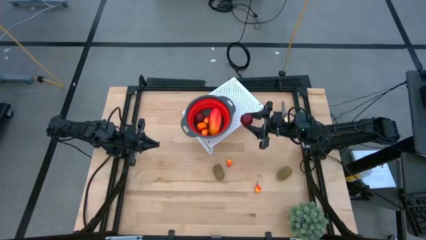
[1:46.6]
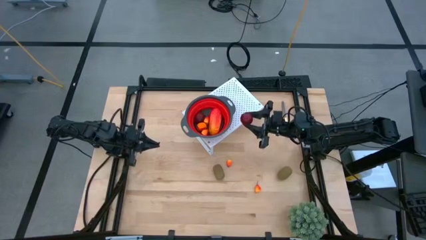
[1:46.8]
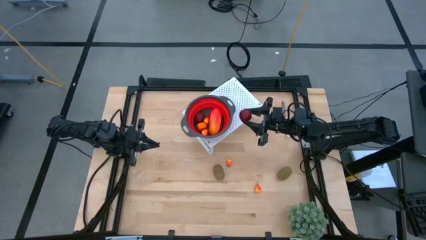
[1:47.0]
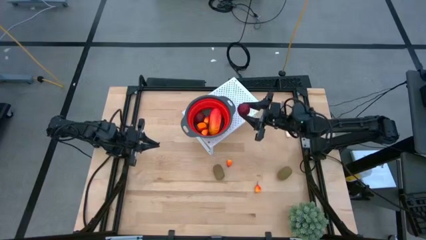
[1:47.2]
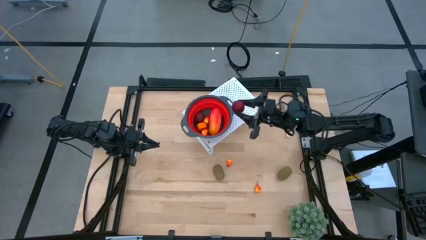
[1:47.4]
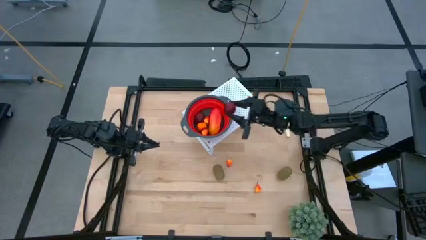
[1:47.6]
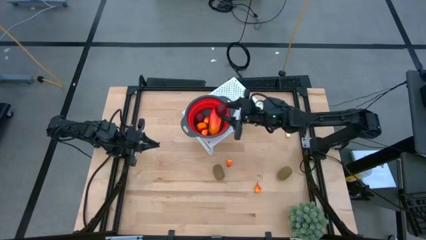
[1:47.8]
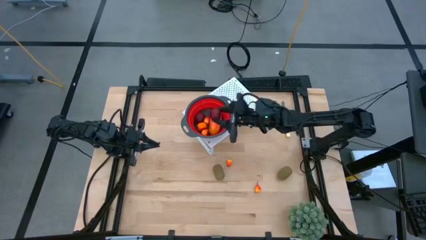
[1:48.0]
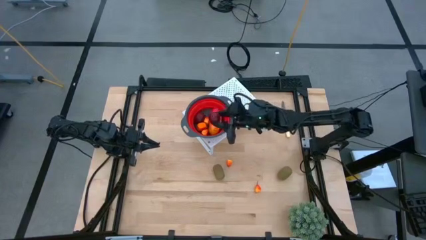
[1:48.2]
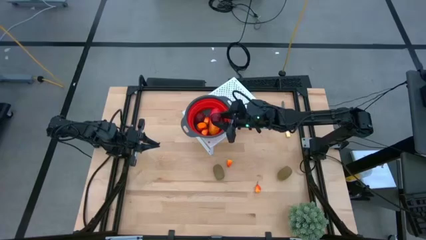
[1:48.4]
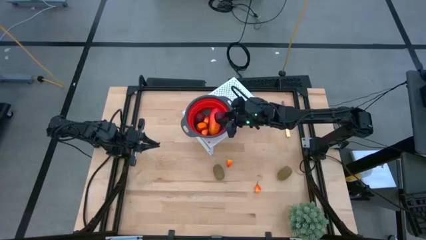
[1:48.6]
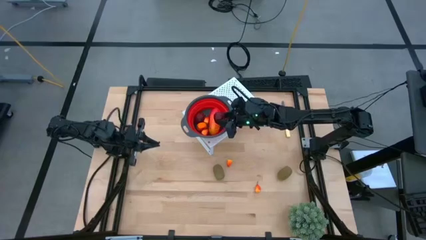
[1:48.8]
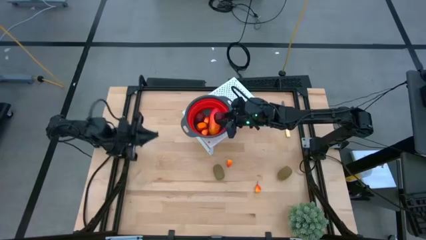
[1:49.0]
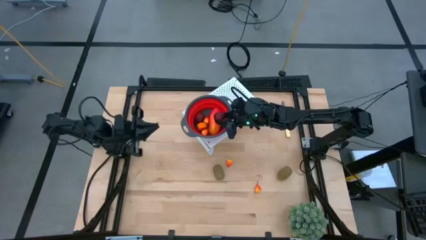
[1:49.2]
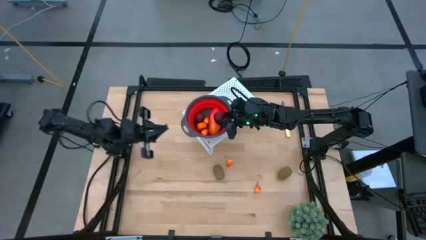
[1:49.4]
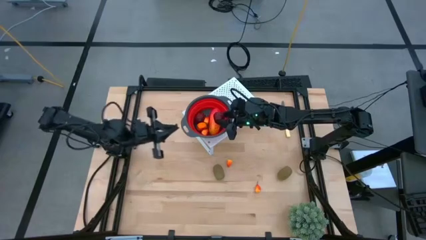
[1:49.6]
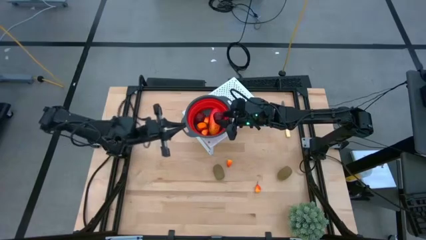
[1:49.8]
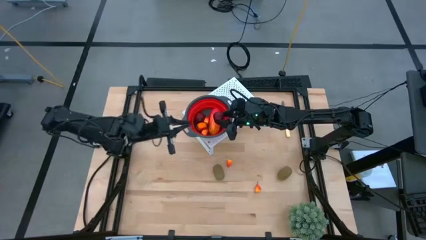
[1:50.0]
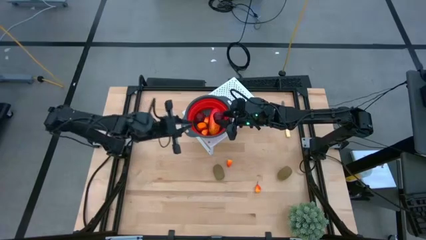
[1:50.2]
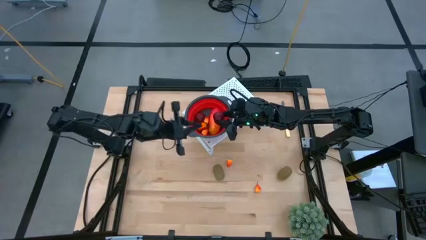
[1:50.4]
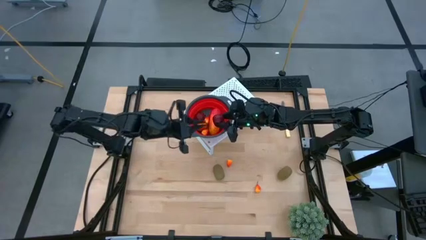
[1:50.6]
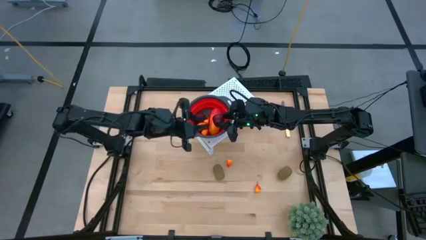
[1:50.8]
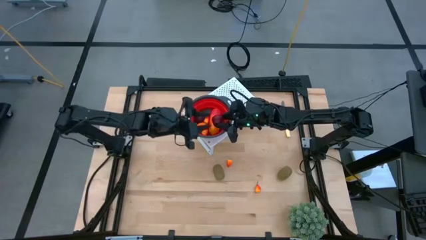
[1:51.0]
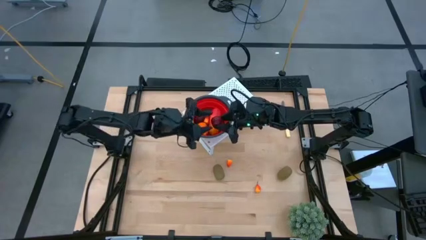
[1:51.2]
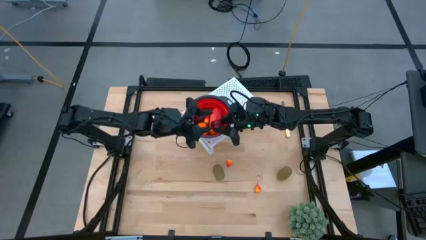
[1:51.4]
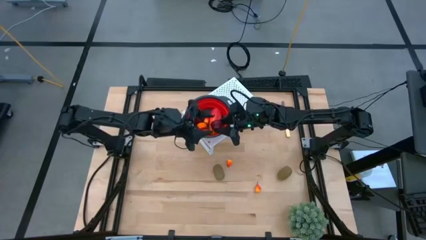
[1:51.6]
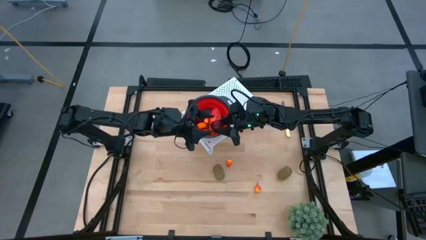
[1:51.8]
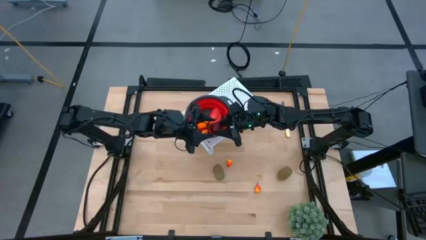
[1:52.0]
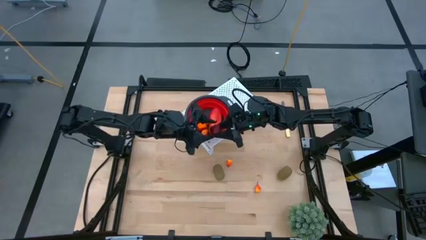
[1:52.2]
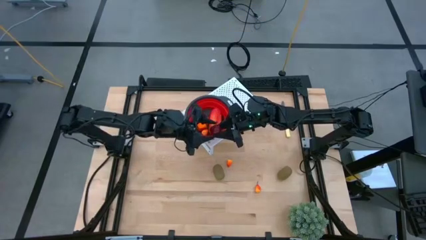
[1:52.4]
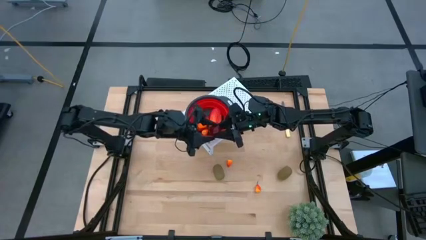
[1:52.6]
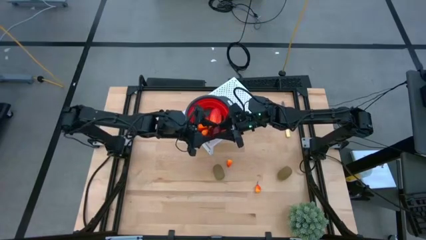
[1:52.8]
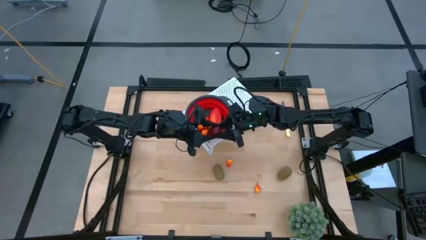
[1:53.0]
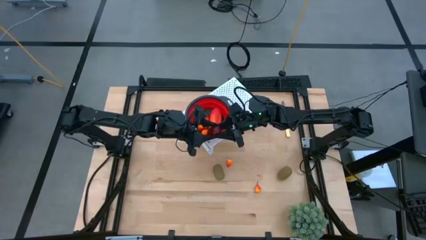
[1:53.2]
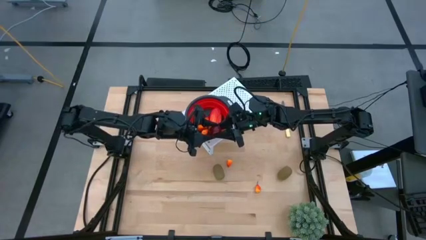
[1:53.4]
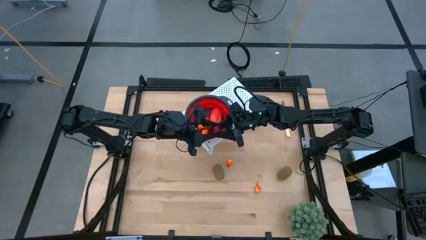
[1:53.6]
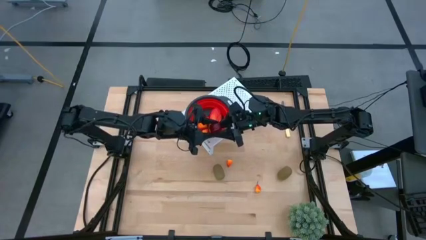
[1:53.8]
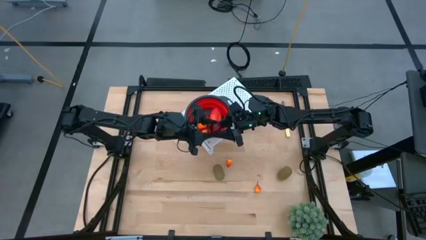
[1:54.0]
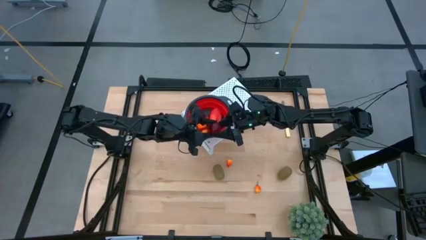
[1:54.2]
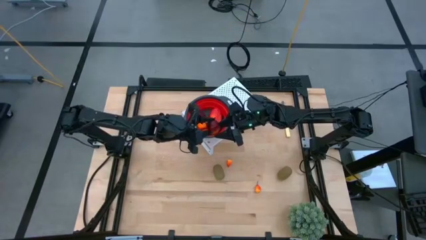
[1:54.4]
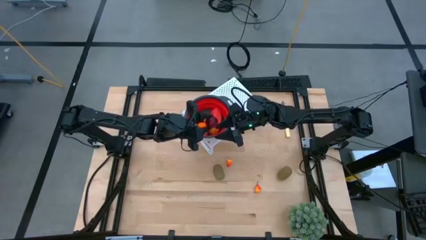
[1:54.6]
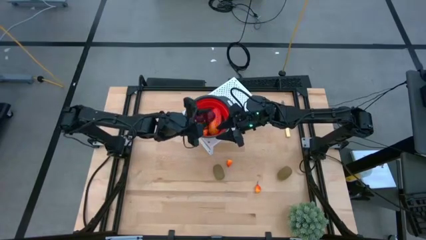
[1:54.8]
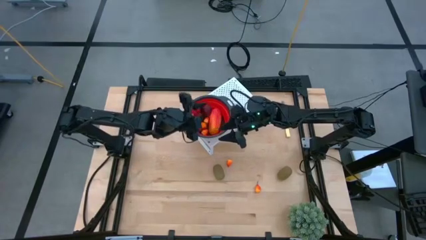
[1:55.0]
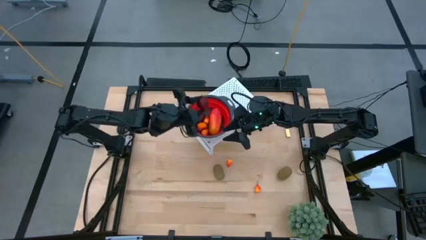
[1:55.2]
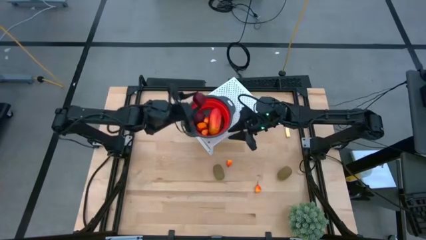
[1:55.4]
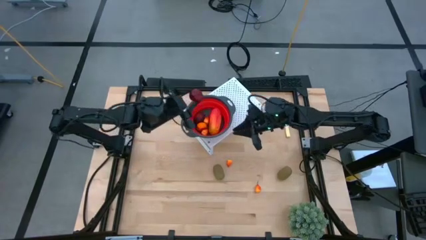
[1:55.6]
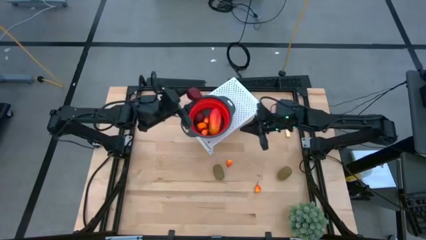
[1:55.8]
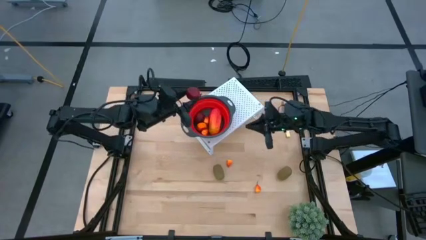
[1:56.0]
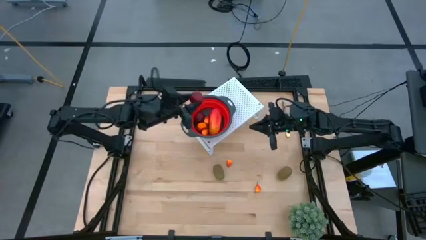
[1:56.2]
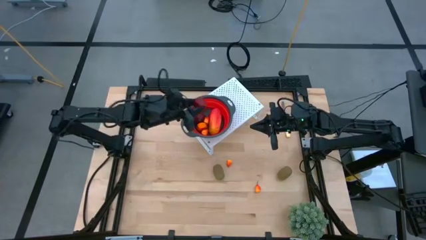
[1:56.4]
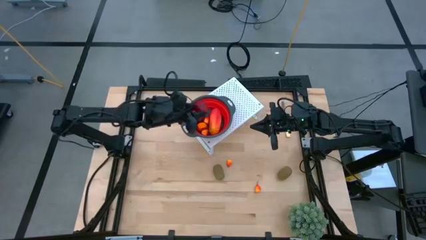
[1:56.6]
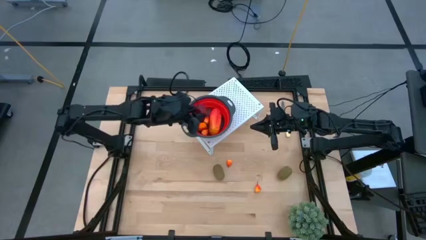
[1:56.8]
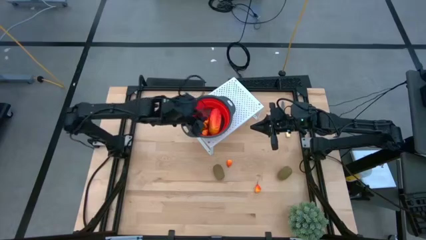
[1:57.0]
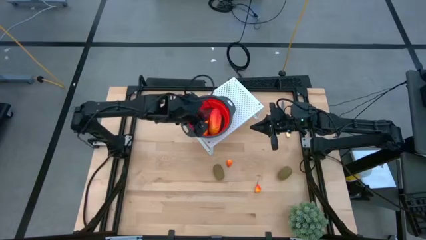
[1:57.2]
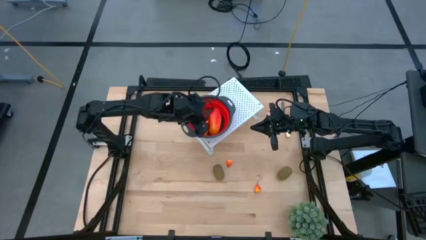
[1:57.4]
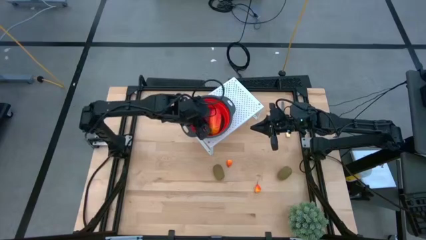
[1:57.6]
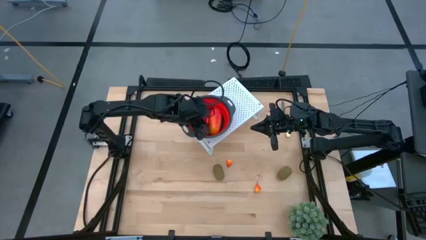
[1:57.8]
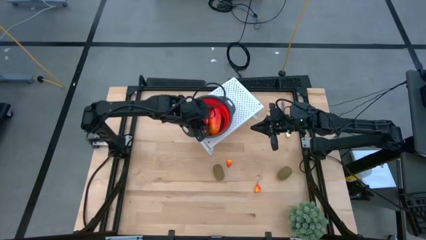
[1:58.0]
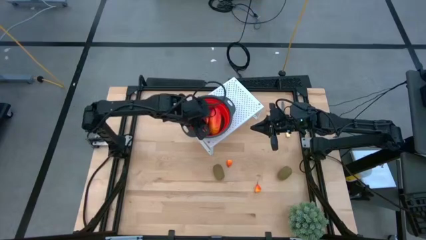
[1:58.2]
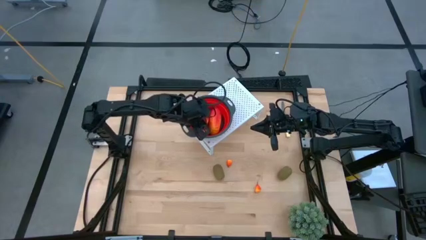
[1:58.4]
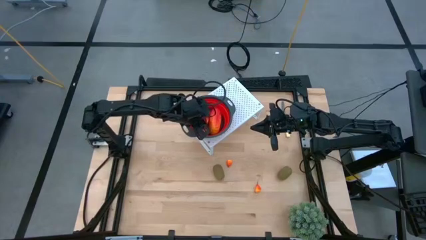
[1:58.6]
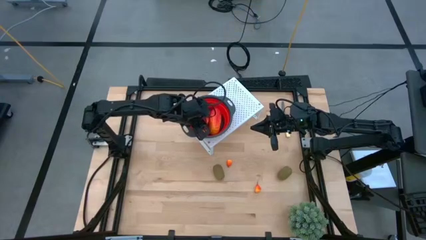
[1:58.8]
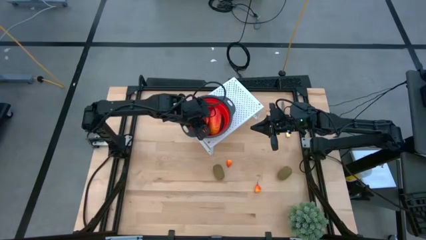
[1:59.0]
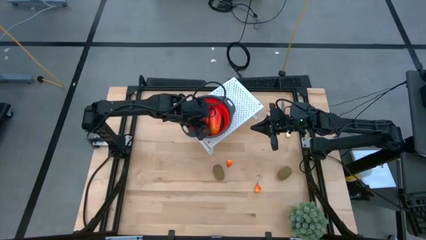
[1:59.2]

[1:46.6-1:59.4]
Task: Pick & Place Fruit
Put the pomegranate into the red strainer bowl on the shelf

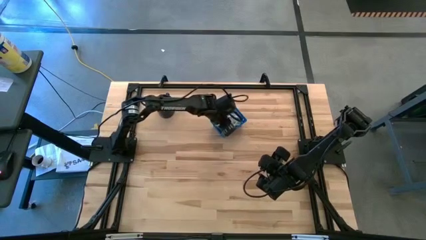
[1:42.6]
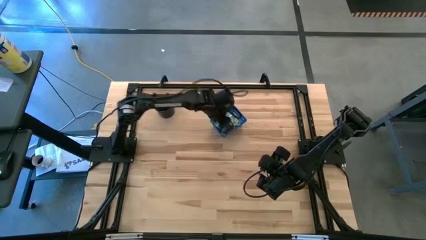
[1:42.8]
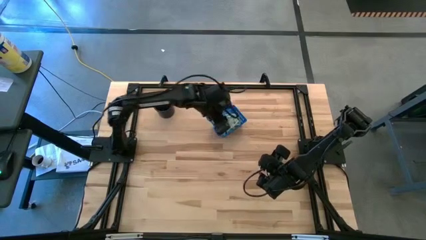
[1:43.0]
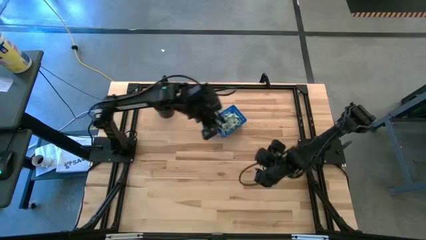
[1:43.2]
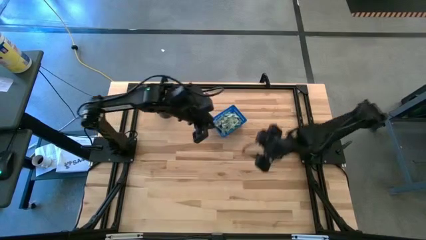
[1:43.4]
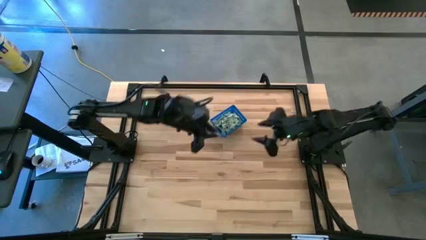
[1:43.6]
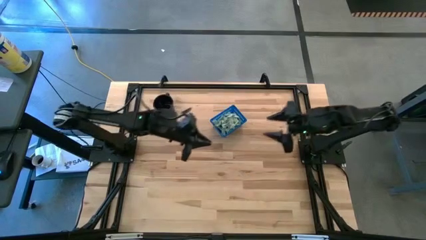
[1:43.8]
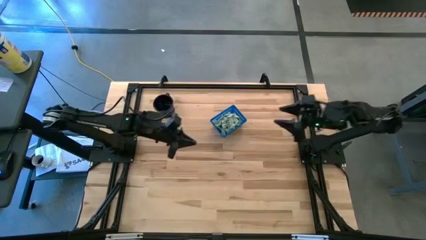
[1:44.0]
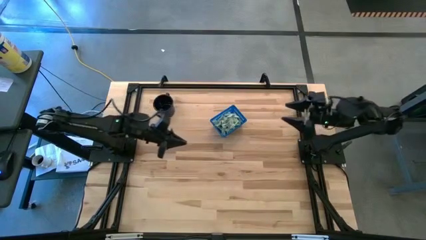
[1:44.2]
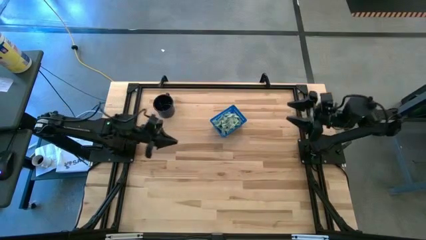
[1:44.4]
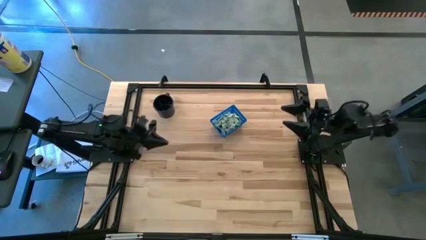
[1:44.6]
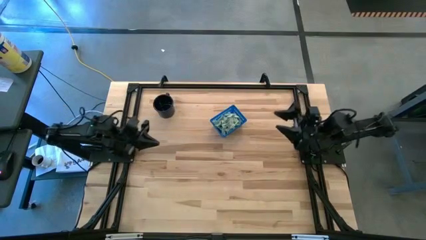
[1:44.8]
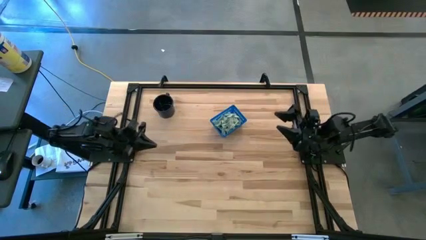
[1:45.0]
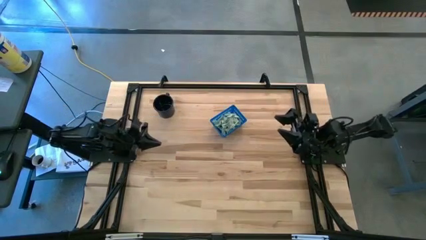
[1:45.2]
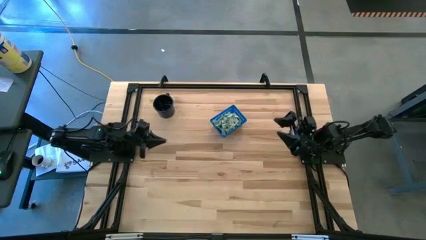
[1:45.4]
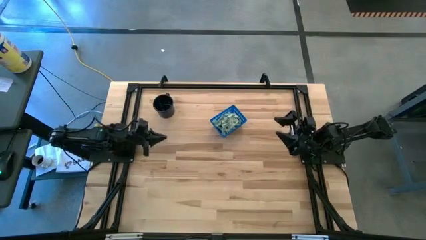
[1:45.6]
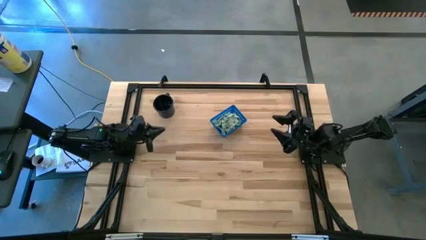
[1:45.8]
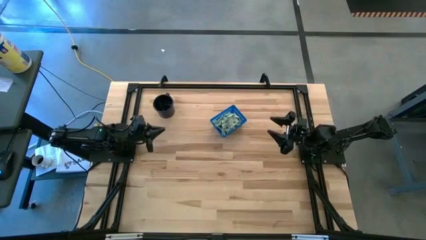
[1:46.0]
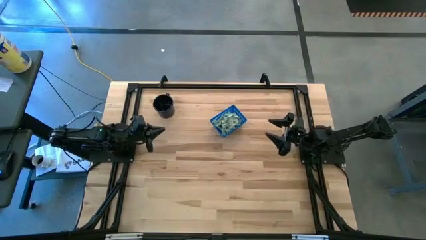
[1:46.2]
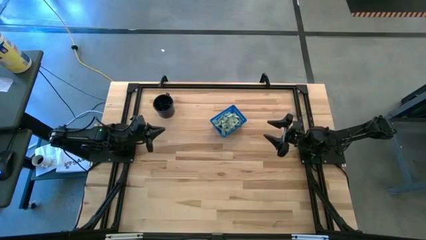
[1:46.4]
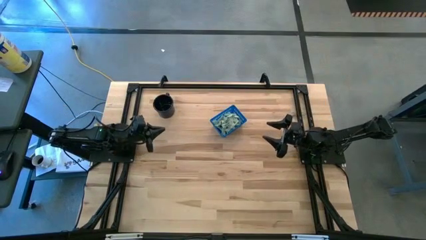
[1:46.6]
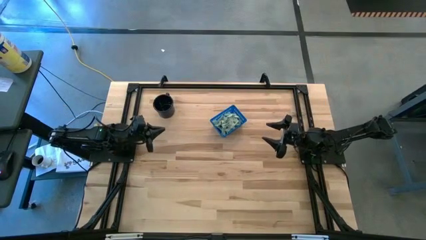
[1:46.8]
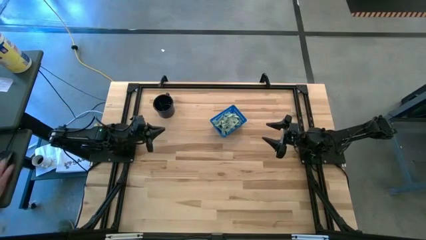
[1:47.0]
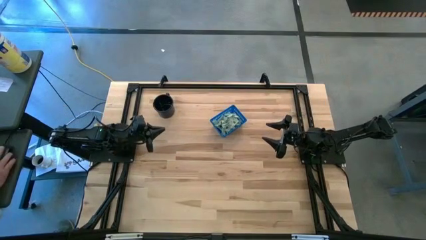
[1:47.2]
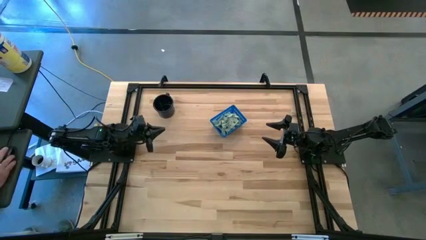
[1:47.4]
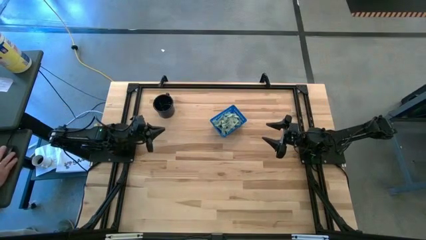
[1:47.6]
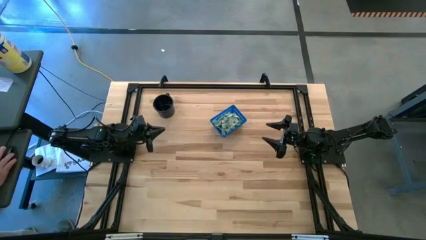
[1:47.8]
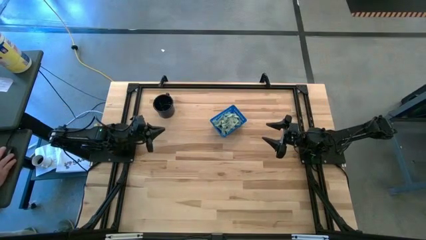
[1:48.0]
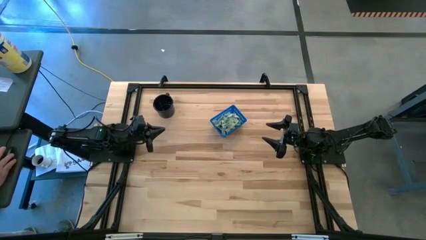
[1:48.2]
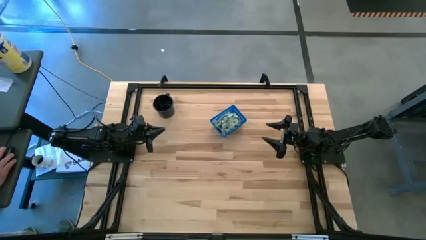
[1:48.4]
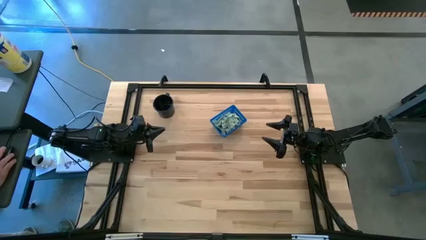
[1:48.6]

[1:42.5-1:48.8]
Task: Pick and place Stevia / Truvia into bins
Return to Home Position
